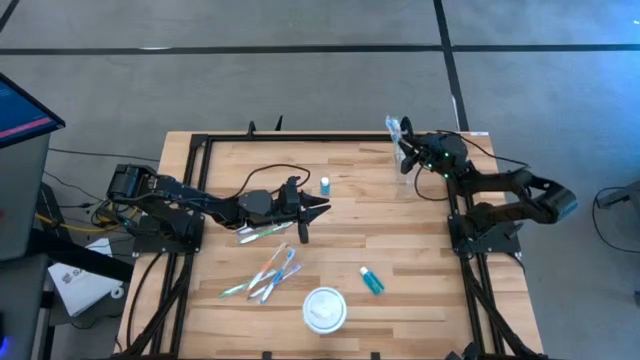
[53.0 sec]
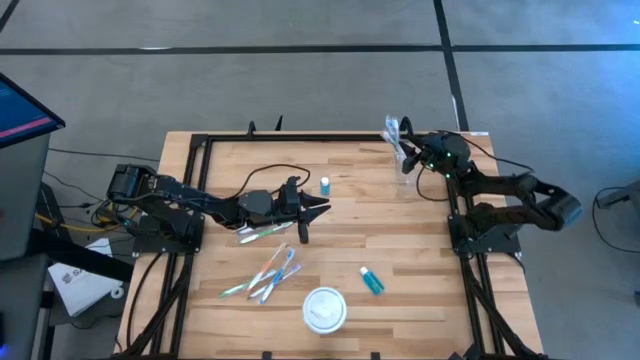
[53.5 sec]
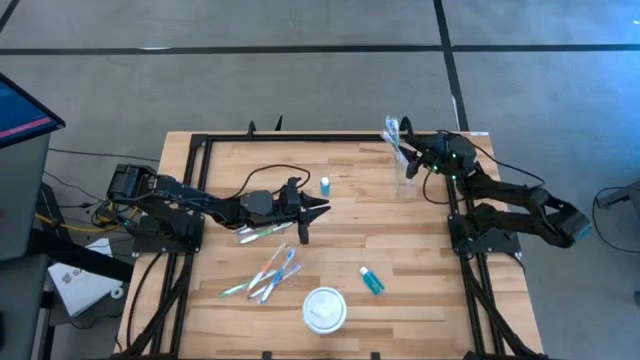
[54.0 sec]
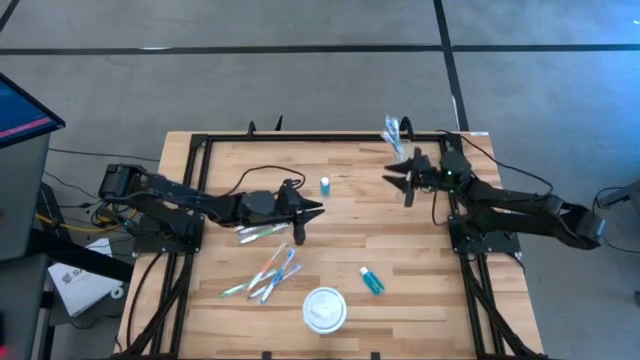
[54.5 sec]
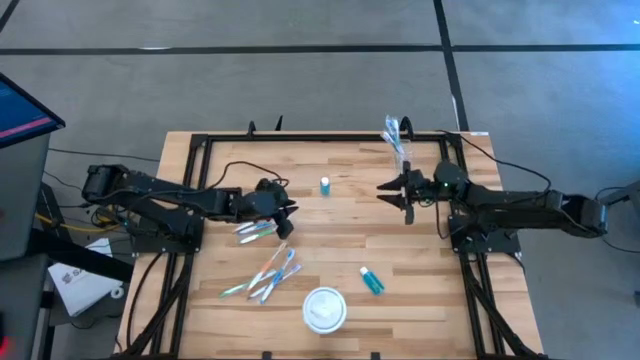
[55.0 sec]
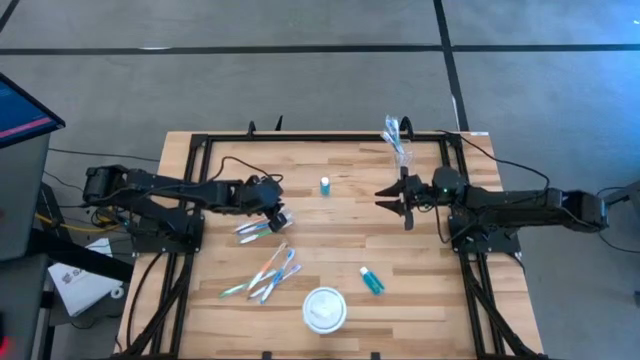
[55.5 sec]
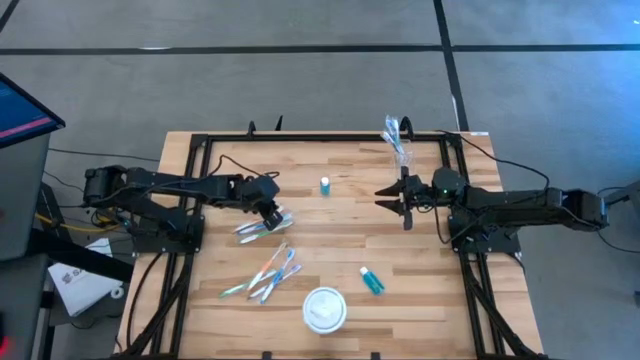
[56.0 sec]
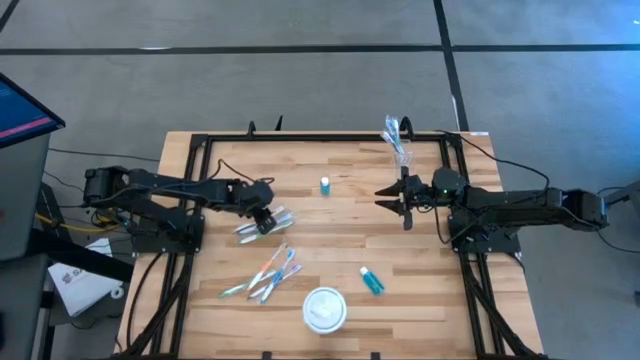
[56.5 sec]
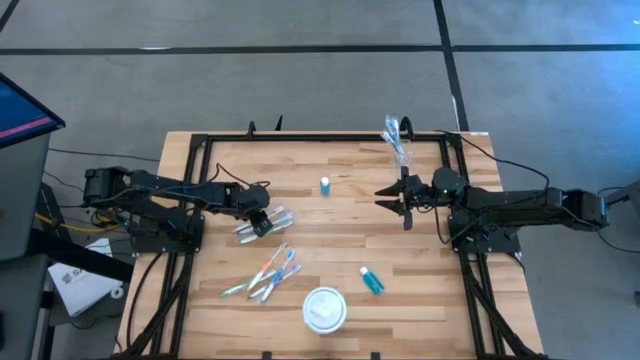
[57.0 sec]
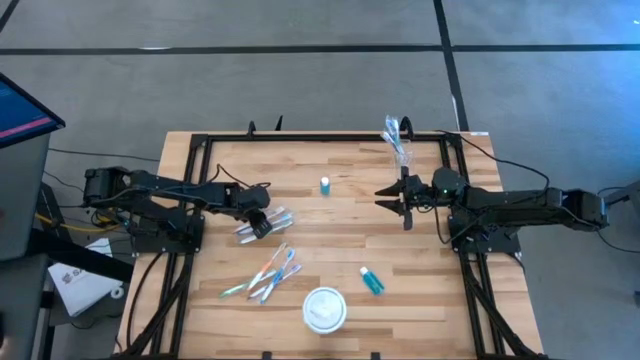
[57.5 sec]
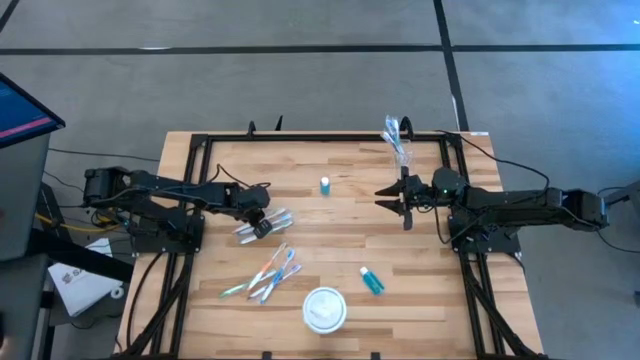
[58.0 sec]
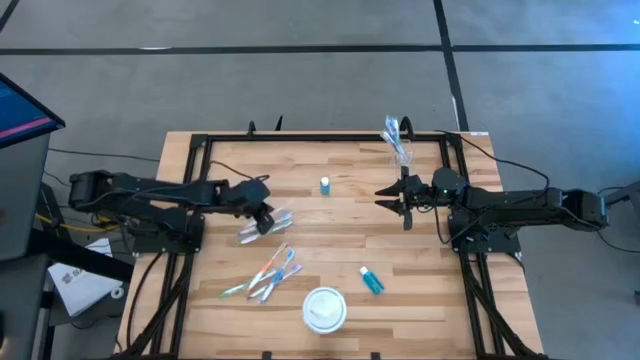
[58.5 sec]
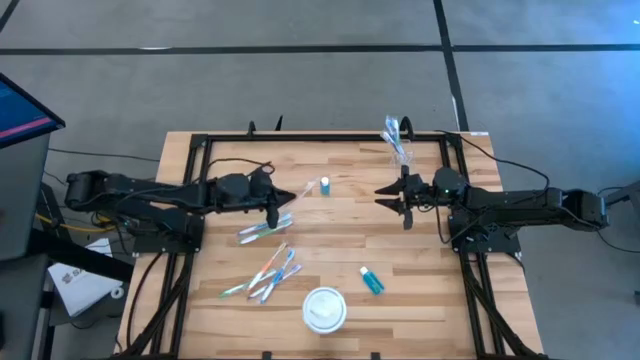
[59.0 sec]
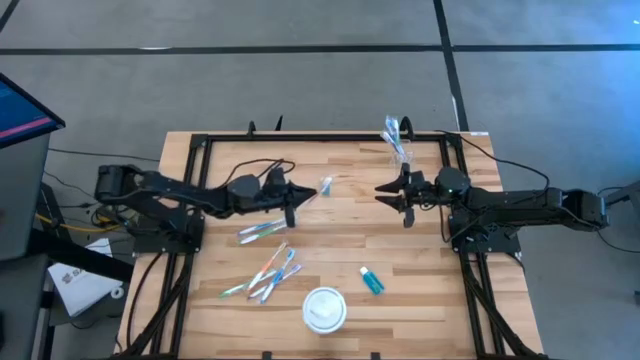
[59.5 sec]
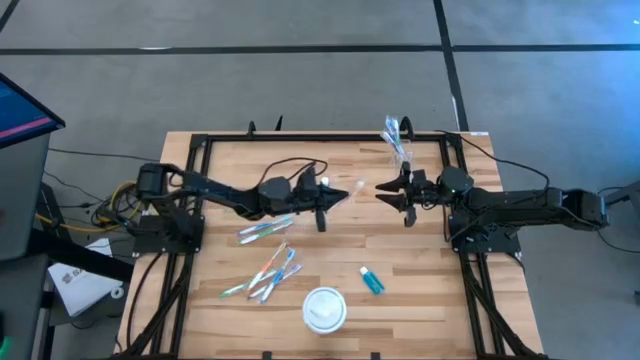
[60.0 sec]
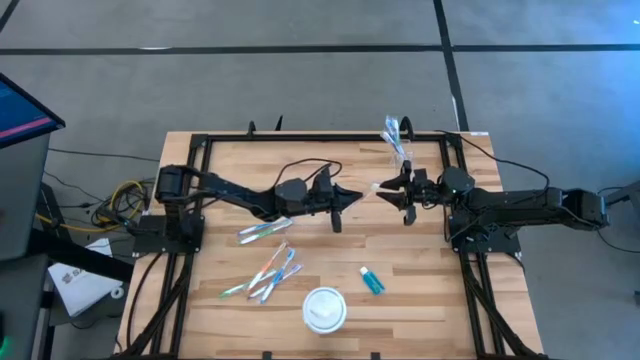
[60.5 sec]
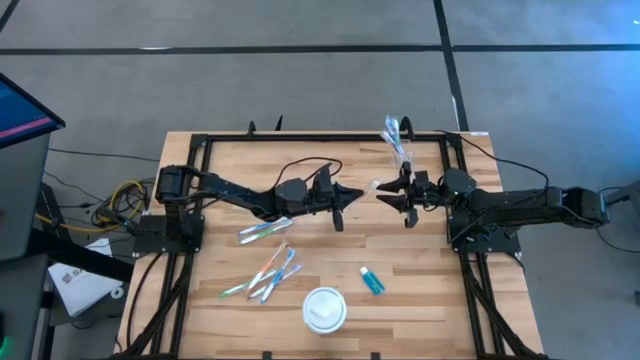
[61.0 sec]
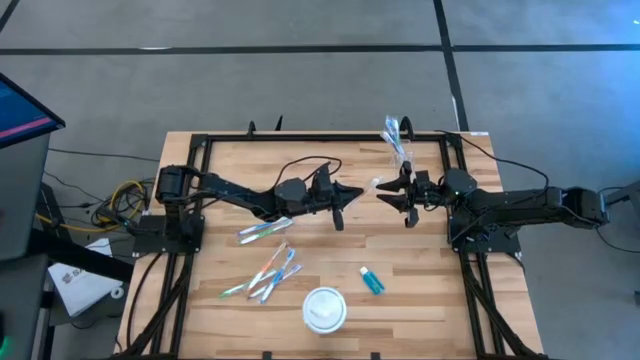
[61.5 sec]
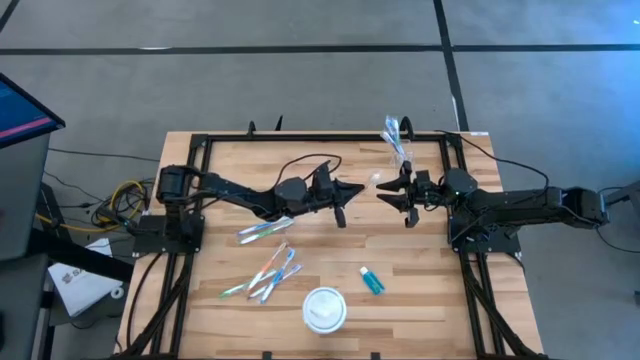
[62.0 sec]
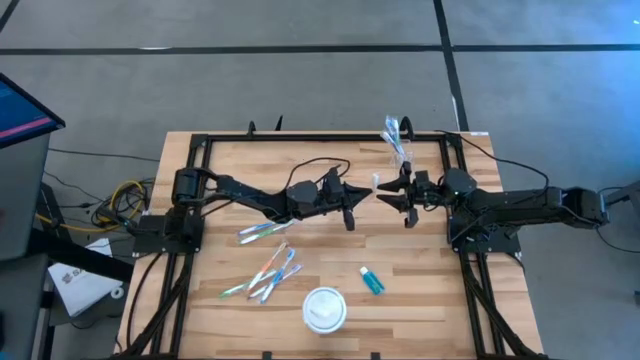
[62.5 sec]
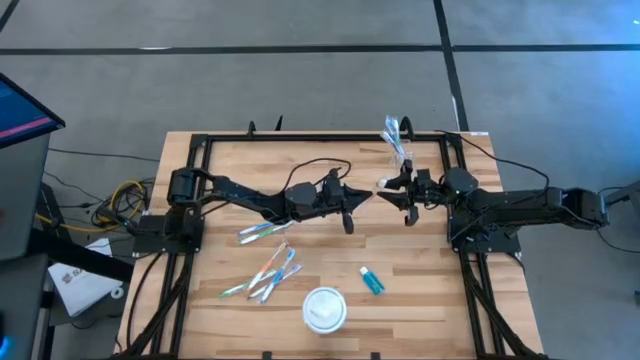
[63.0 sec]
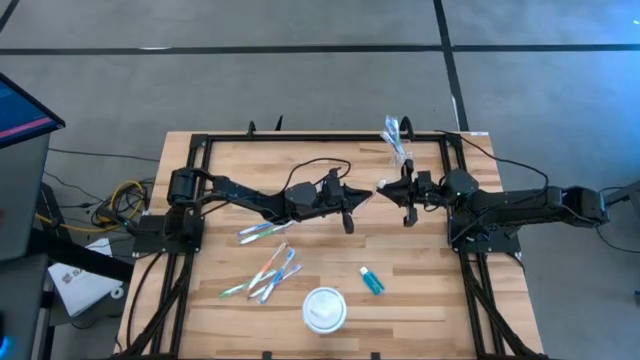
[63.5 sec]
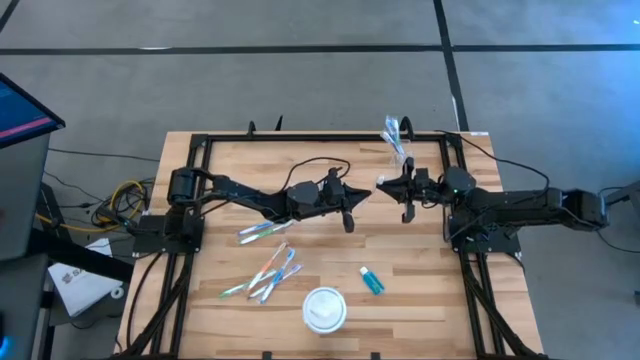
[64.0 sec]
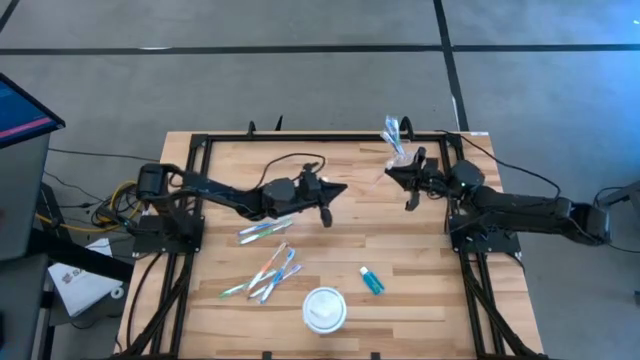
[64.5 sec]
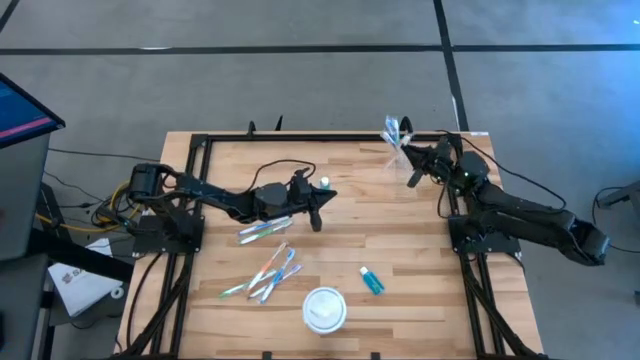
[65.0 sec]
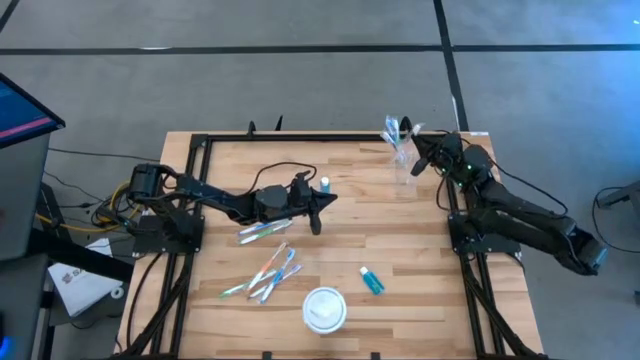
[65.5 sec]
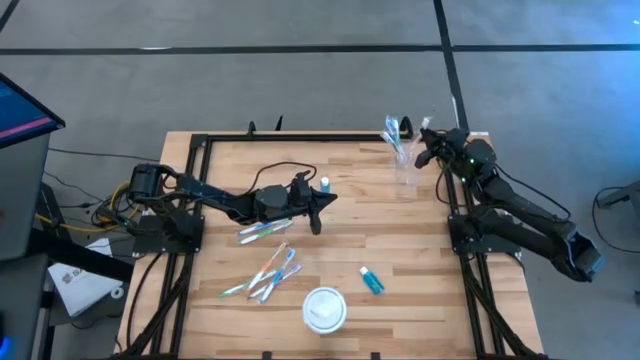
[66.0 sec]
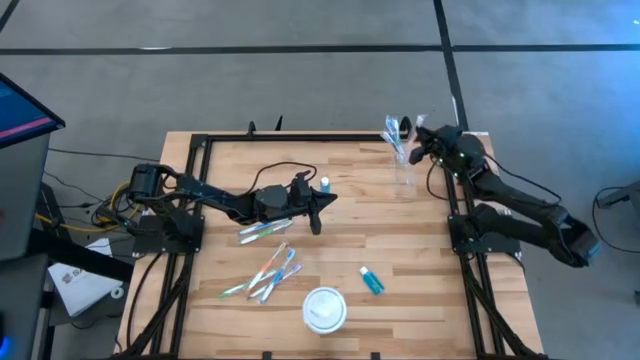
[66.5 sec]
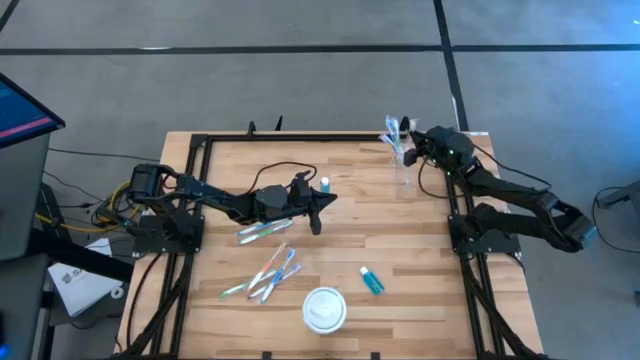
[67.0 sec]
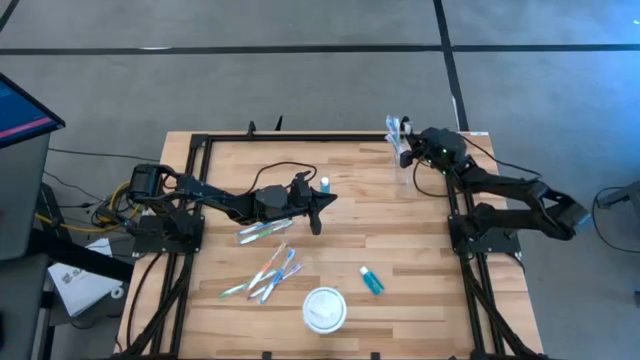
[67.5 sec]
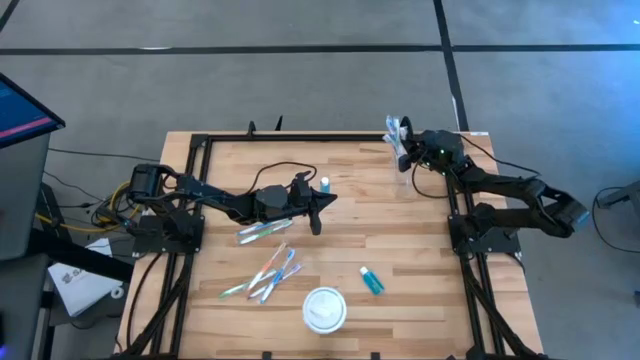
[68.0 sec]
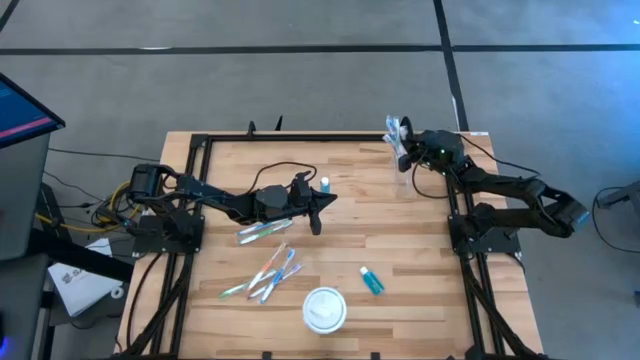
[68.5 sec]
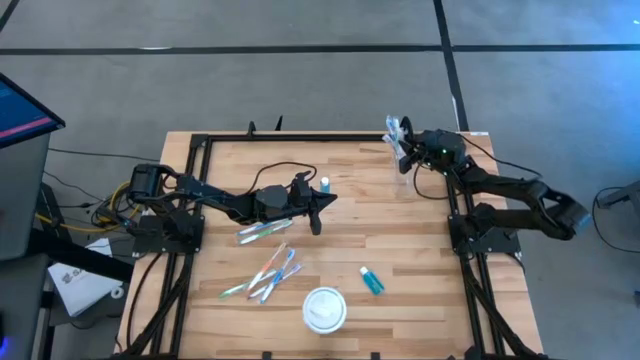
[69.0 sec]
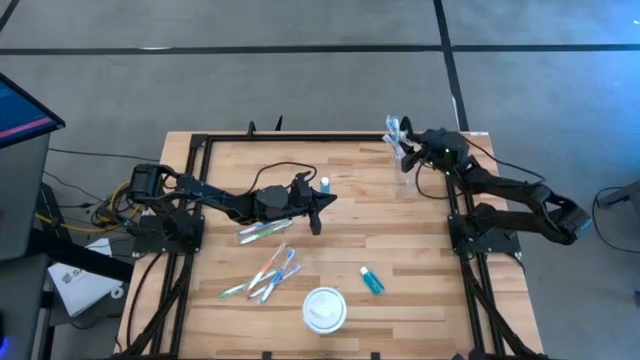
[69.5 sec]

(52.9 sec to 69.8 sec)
Task: Pick & Place toothbrushing station
Put the orange toothbrush into the transparent organizer

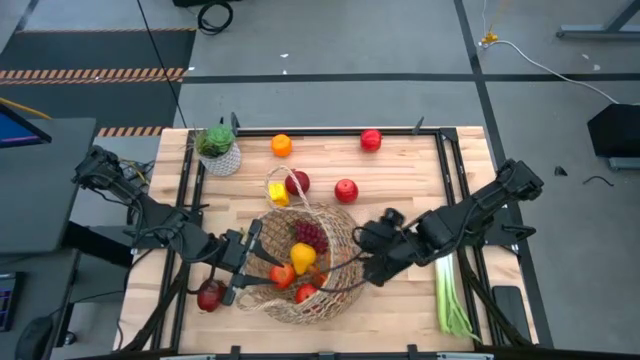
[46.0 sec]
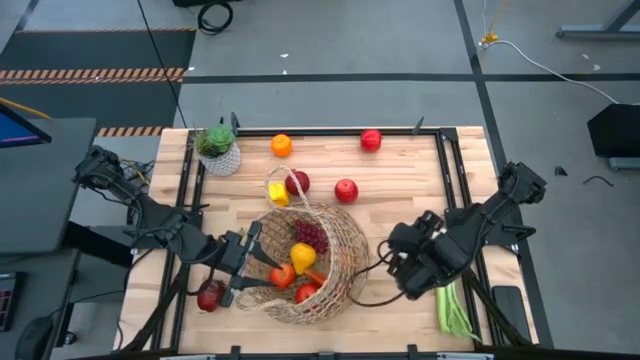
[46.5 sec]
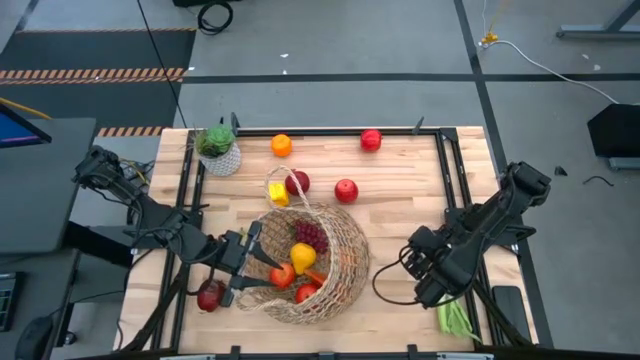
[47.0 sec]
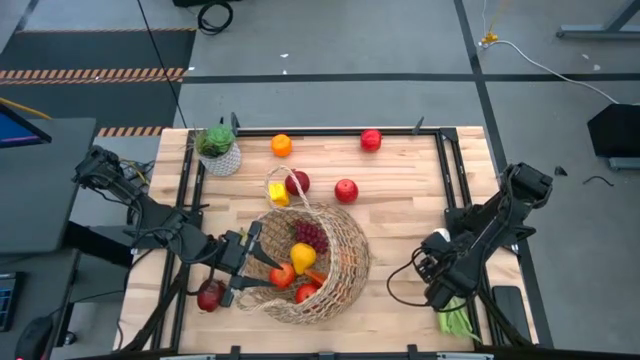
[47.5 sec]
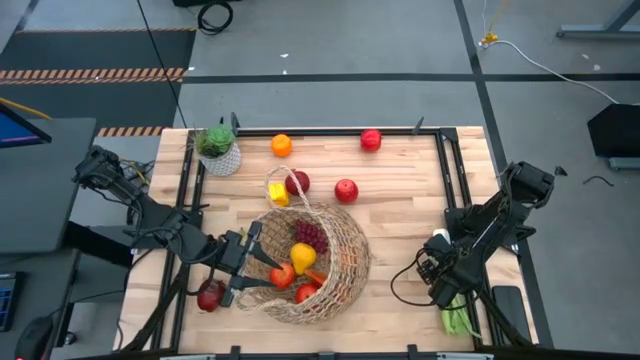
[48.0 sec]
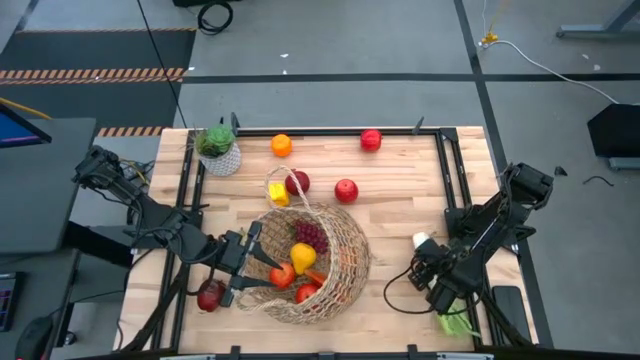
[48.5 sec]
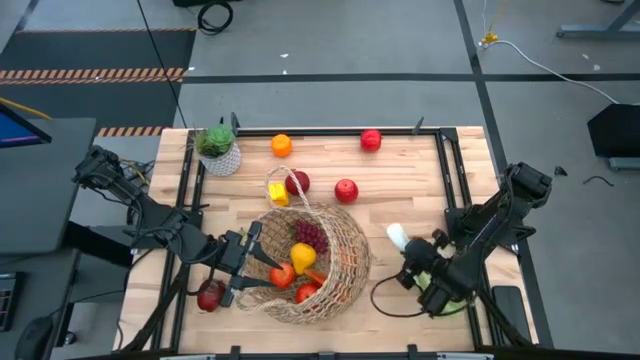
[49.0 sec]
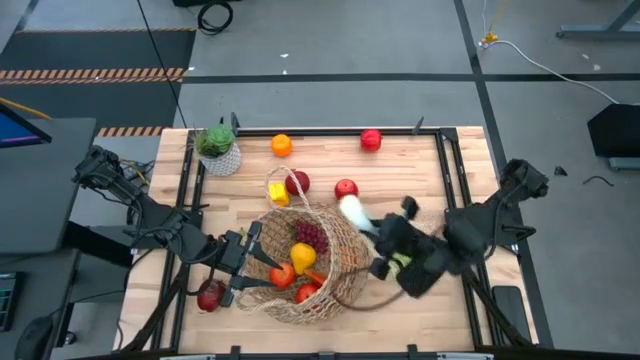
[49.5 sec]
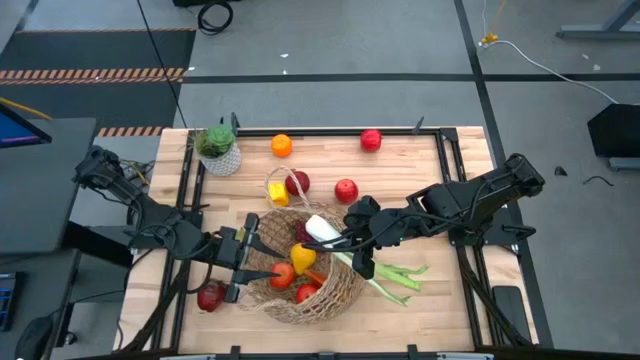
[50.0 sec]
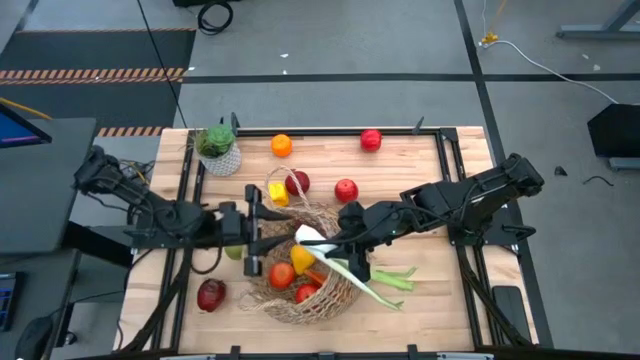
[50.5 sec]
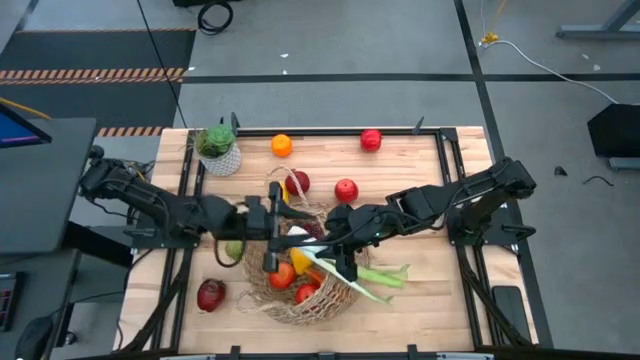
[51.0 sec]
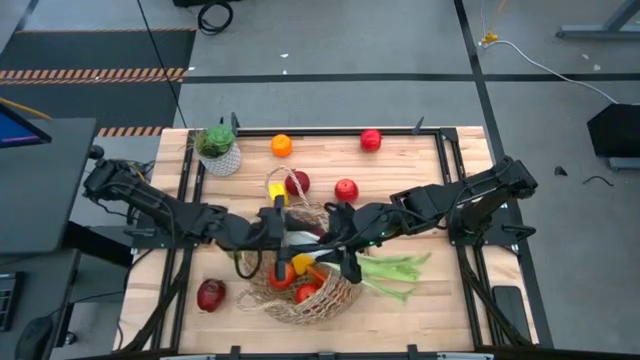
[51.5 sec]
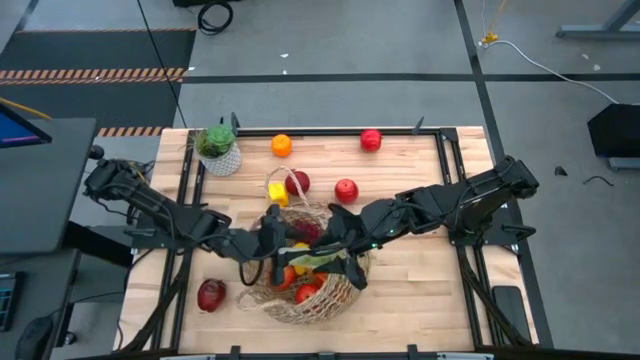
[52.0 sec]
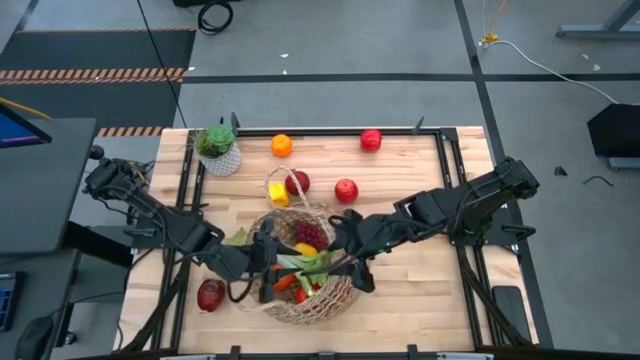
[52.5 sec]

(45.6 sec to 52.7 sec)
Task: Build produce basket
Put the celery into the basket
